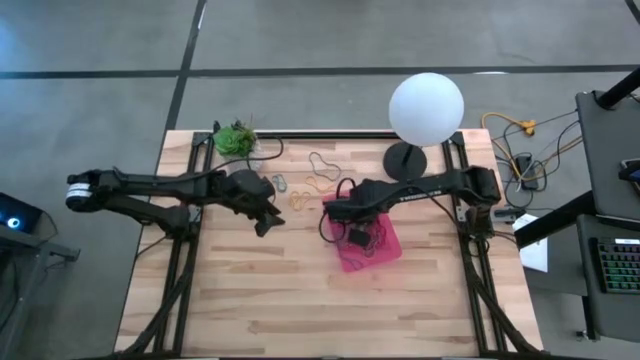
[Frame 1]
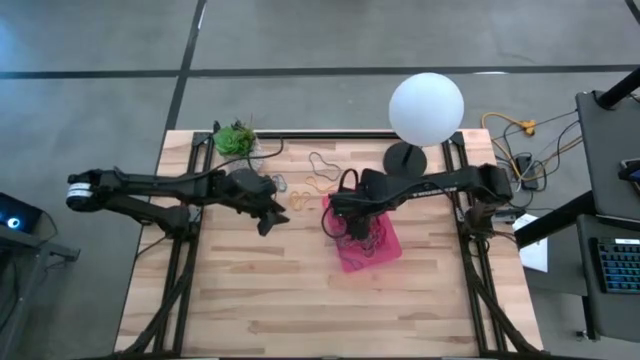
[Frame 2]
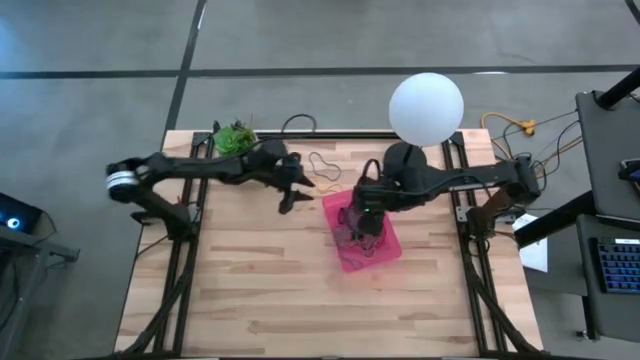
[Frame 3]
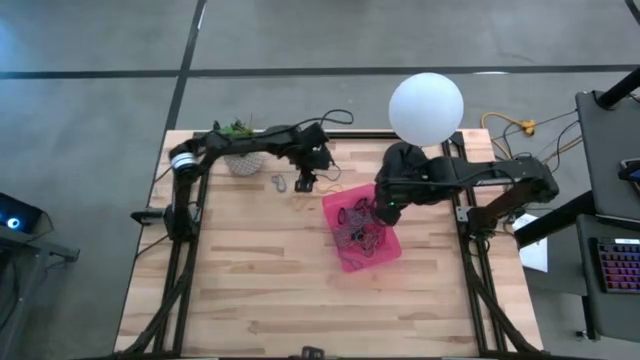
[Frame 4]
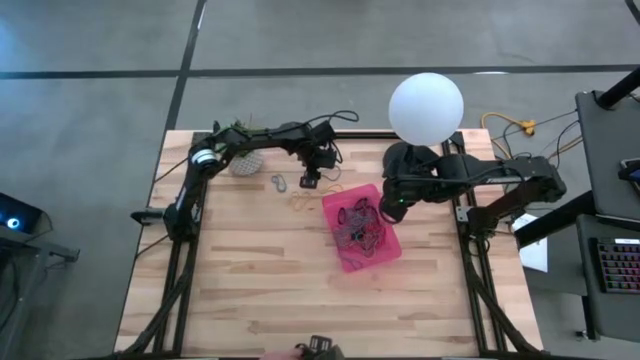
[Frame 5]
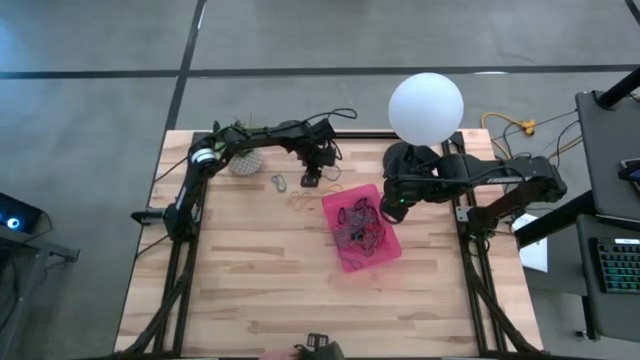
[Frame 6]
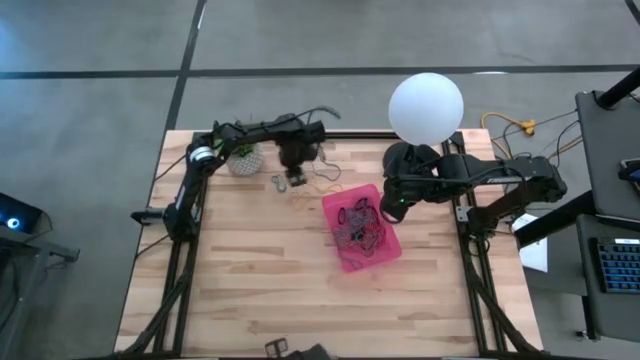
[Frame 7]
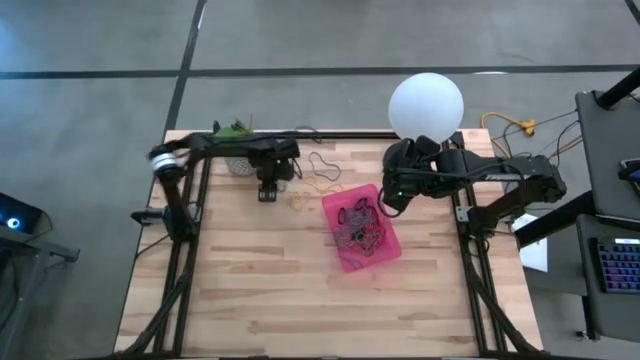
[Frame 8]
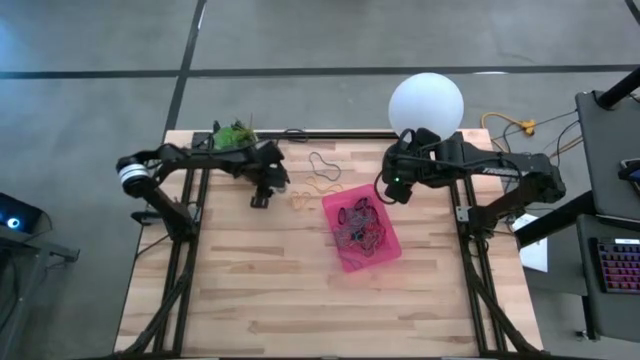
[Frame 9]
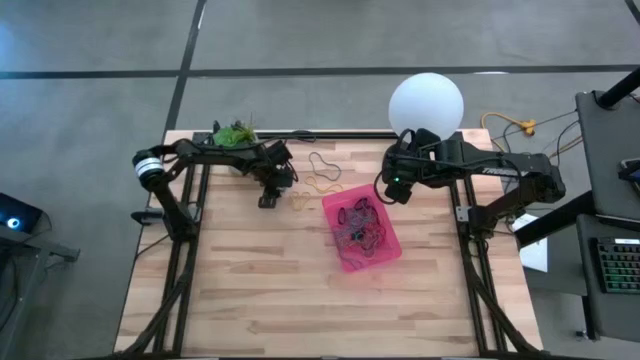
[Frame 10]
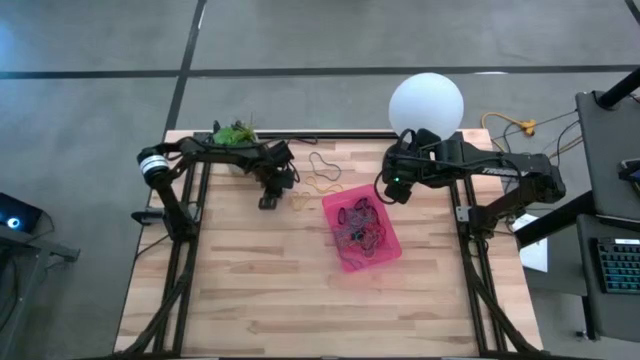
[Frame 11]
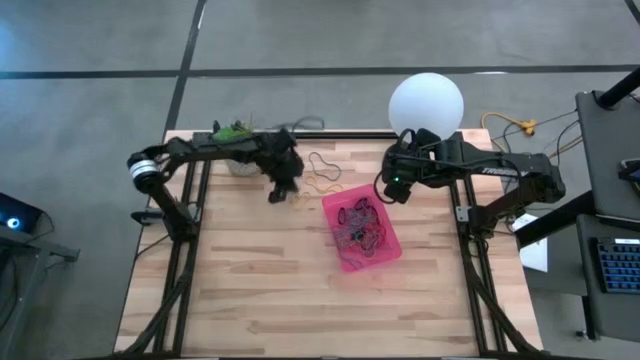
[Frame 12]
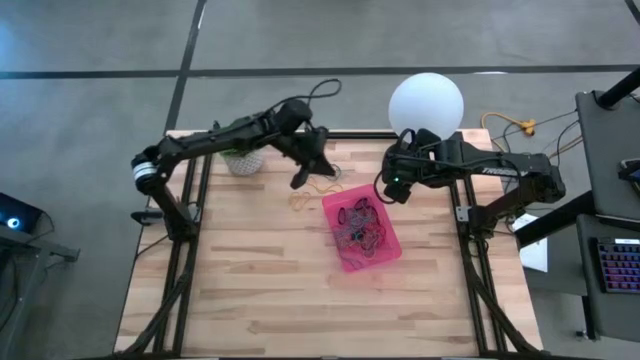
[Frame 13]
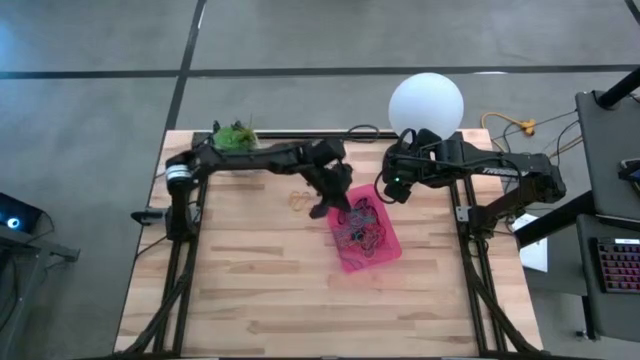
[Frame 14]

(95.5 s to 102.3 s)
Task: Pick and place rubber bands into bin
Put the blue rubber band into the pink bin

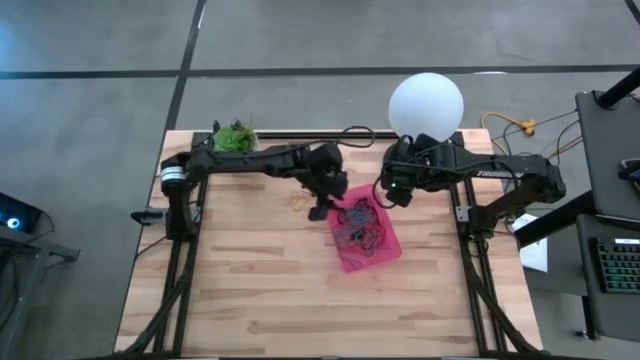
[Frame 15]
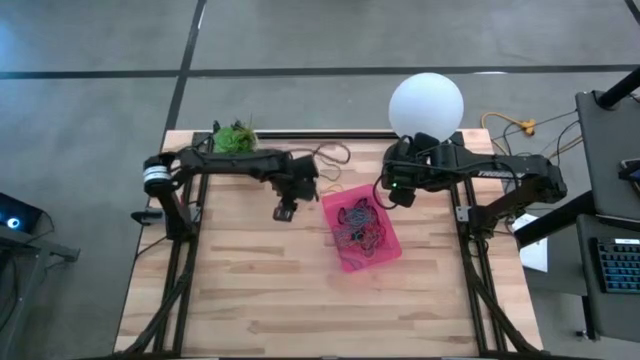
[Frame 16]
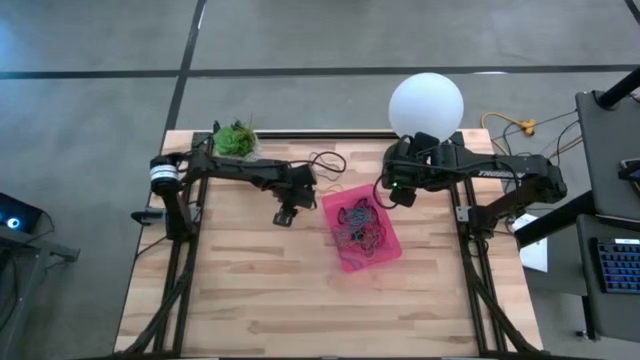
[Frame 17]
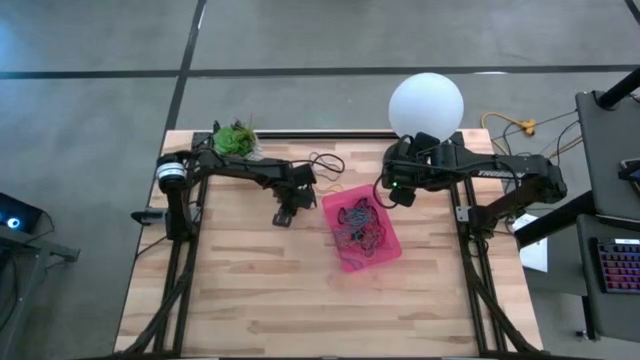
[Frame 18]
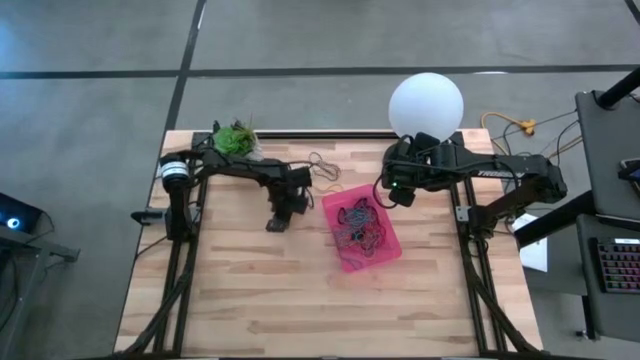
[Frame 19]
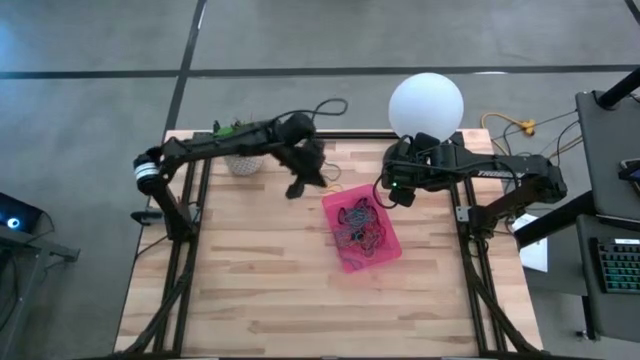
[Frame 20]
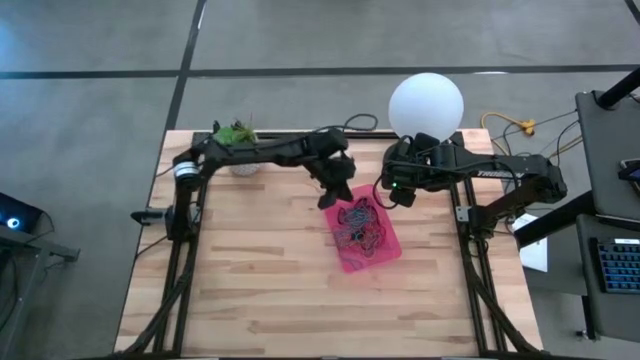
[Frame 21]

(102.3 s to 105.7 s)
Put the yellow rubber band into the pink bin

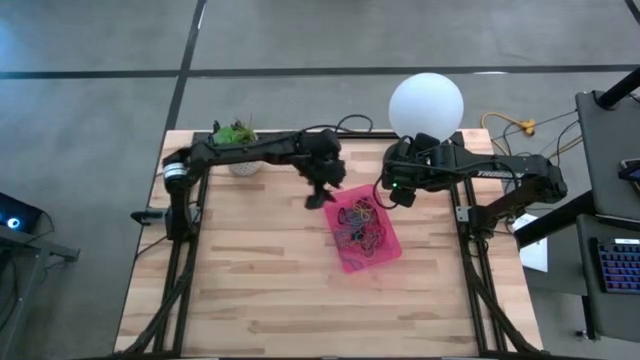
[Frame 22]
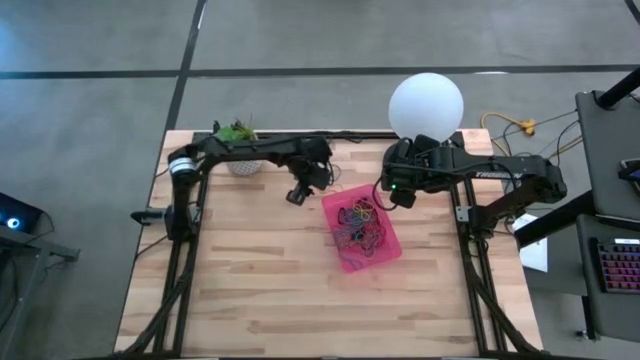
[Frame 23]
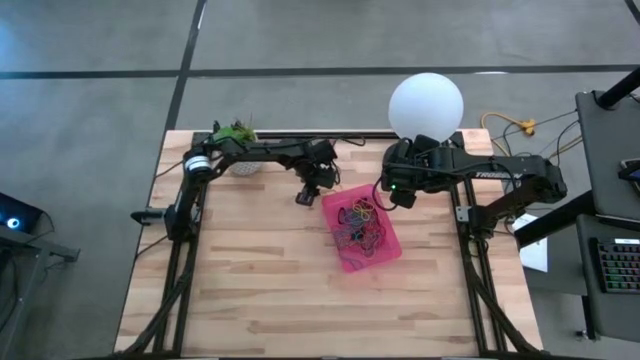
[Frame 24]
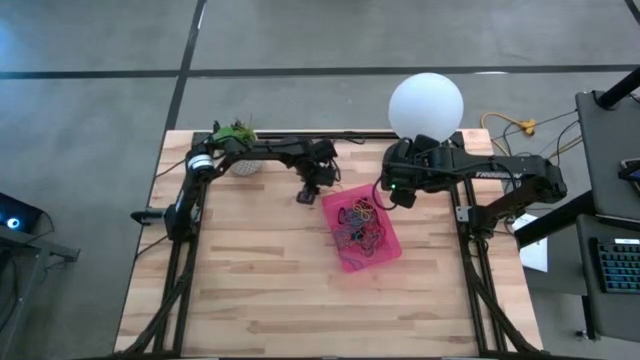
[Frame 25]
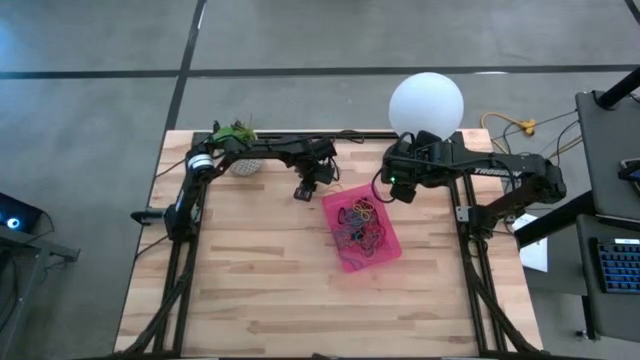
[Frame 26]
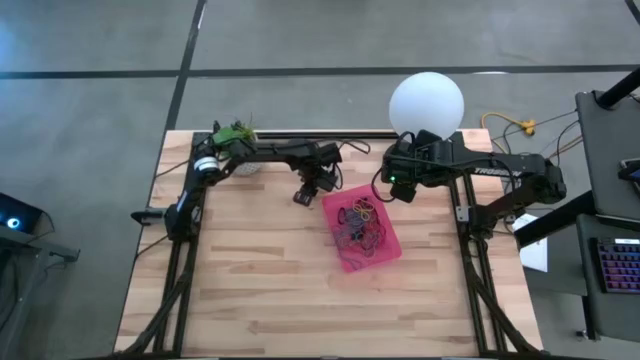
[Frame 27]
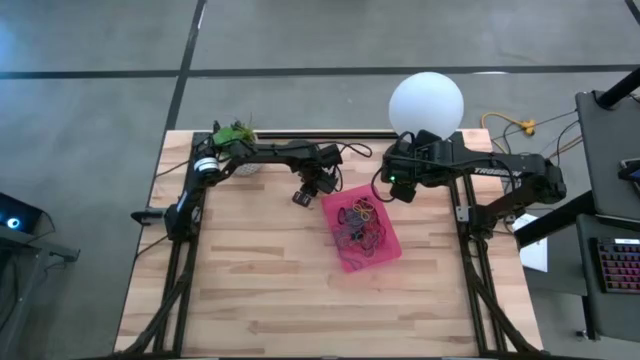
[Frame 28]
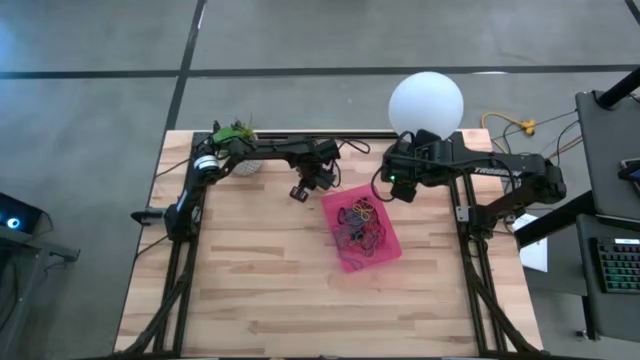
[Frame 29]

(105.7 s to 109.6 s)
Put the yellow rubber band into the pink bin

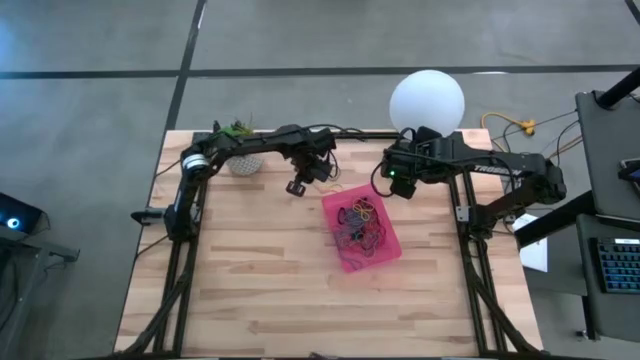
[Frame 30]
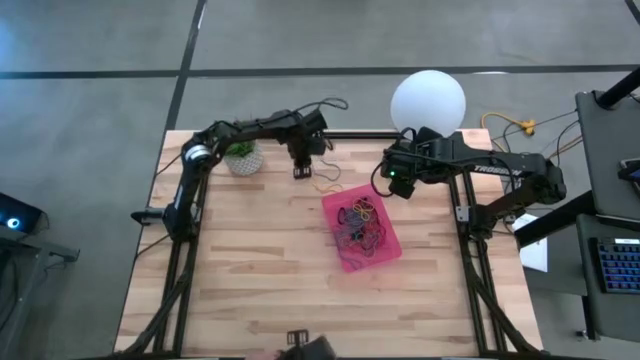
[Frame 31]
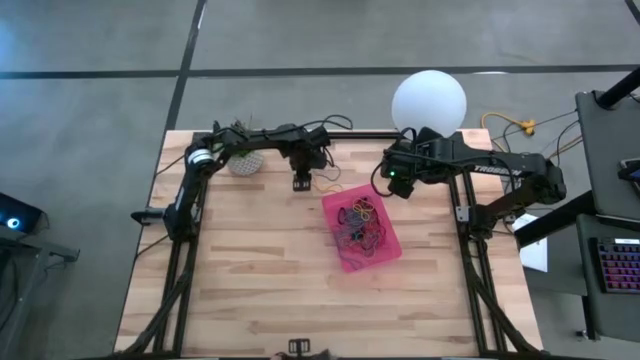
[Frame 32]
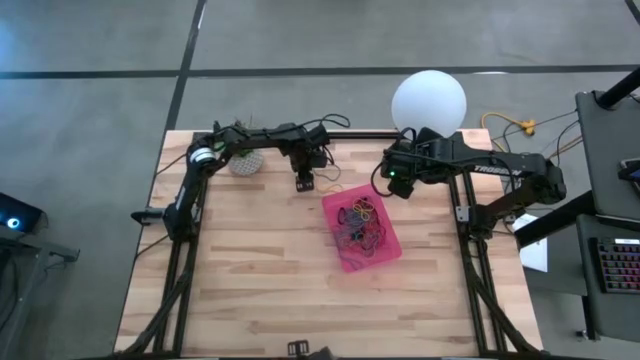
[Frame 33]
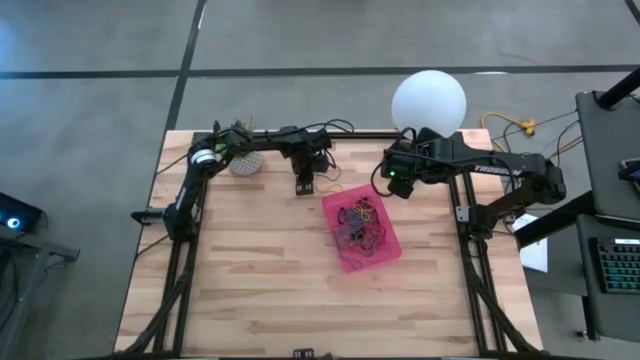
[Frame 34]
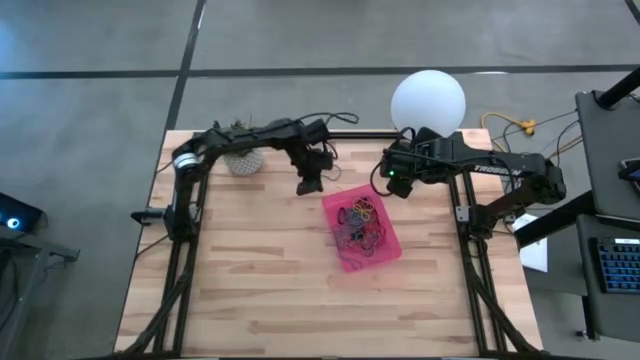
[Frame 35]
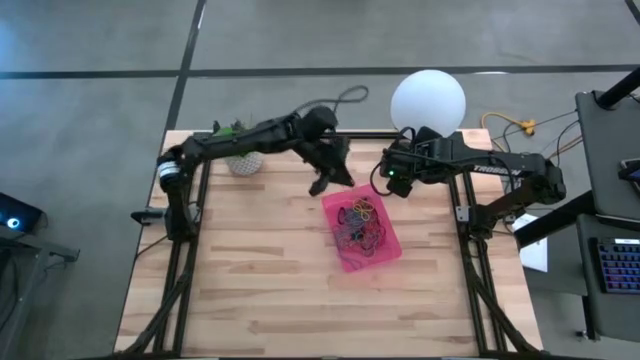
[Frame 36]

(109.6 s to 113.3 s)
Put the yellow rubber band into the pink bin

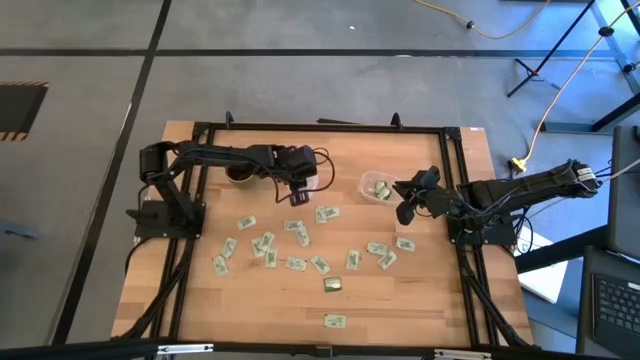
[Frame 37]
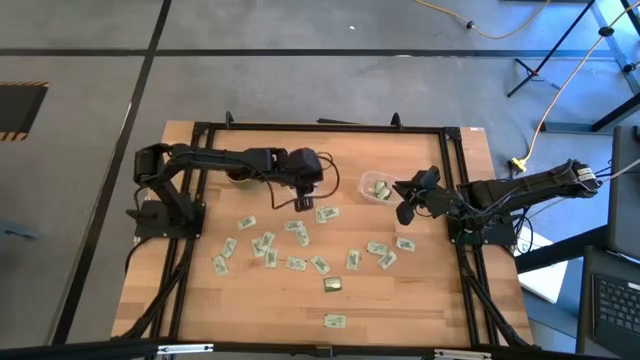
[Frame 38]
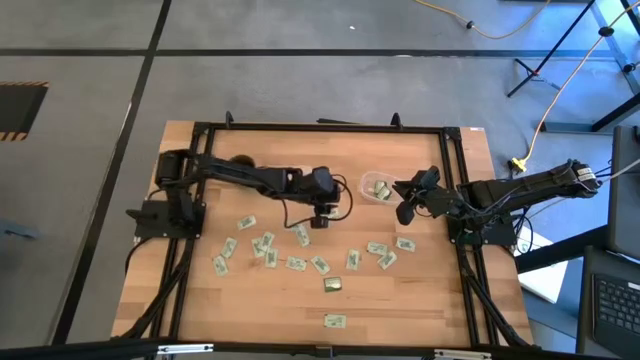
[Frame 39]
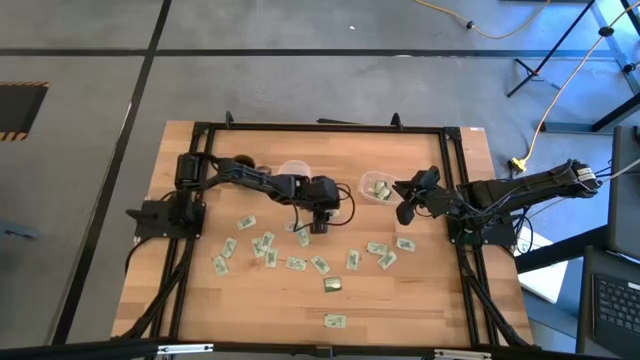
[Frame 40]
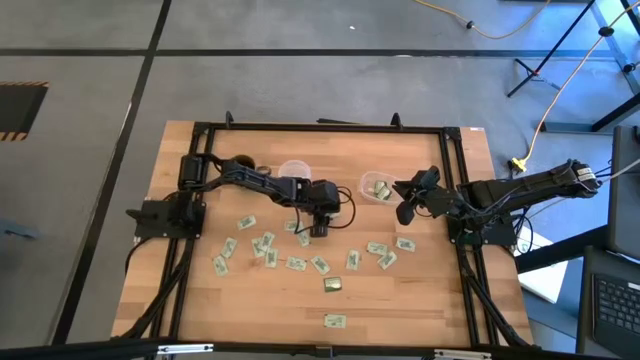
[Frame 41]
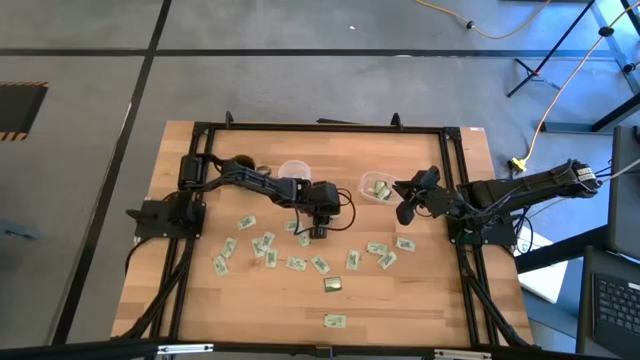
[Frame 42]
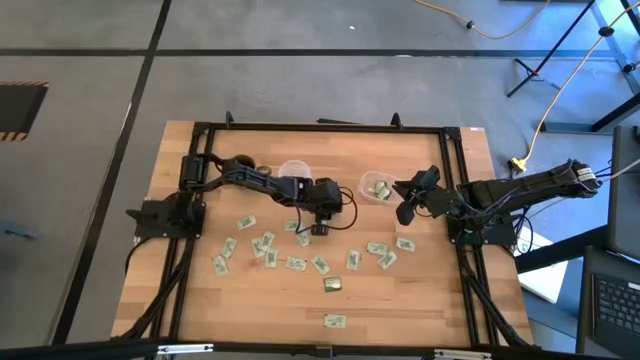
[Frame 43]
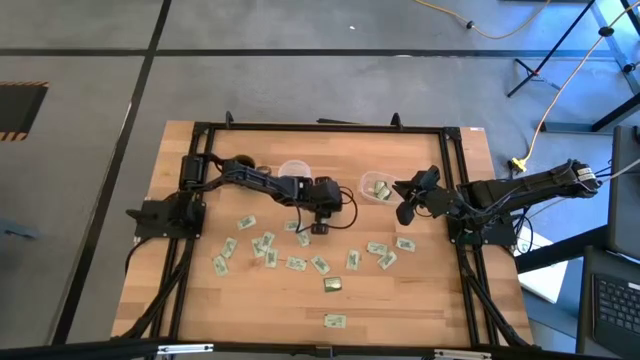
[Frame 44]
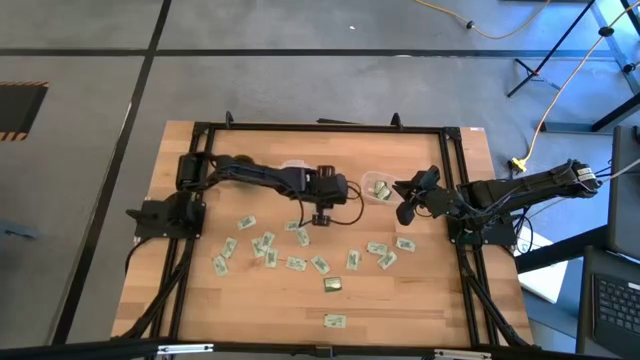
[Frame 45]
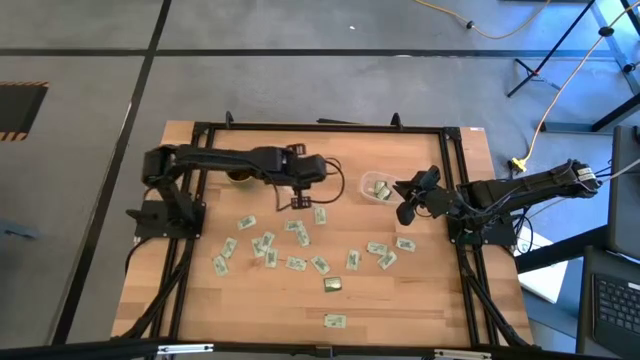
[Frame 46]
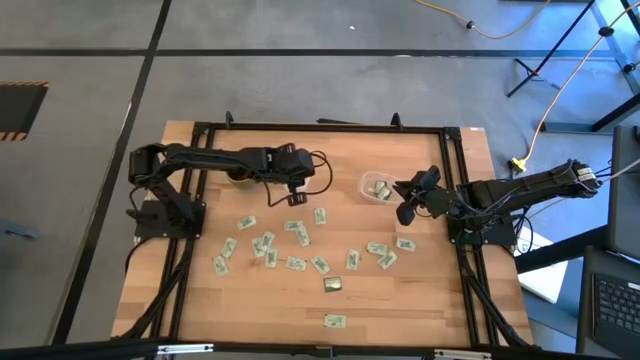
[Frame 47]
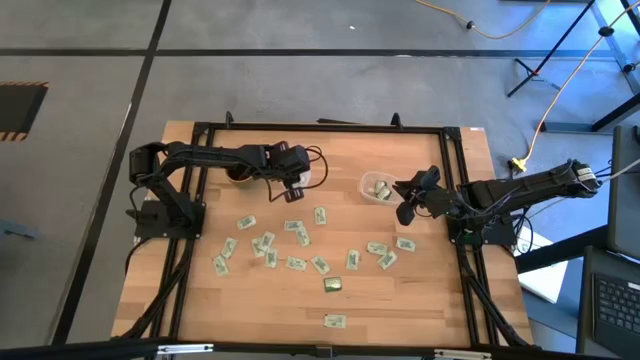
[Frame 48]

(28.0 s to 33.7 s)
Task: Pick and place items into bin
Put the white stevia packet into the left transparent bin
